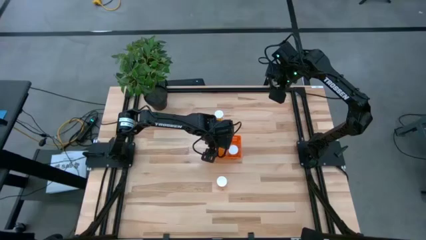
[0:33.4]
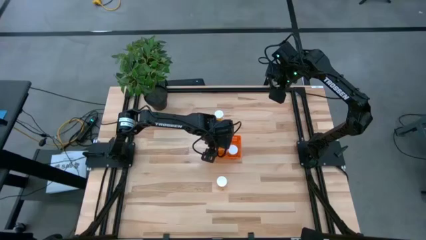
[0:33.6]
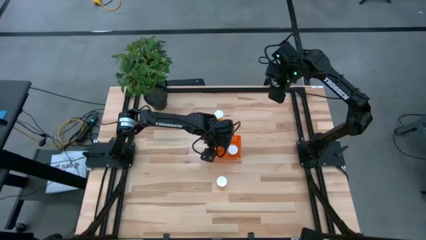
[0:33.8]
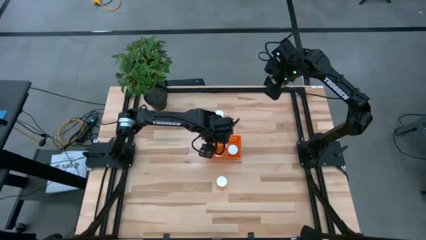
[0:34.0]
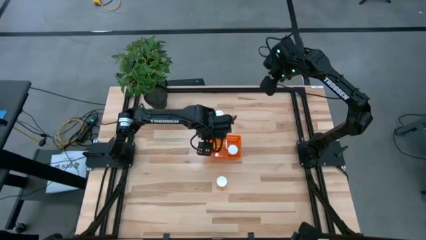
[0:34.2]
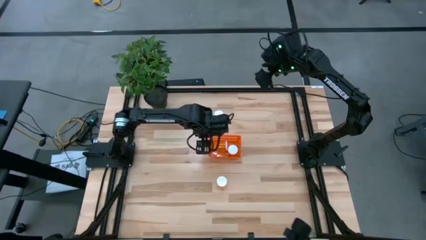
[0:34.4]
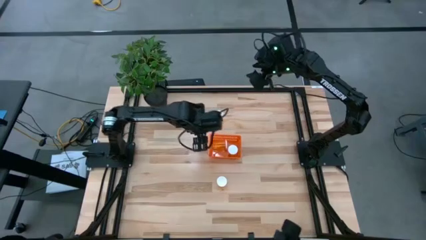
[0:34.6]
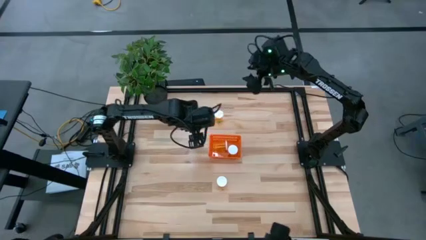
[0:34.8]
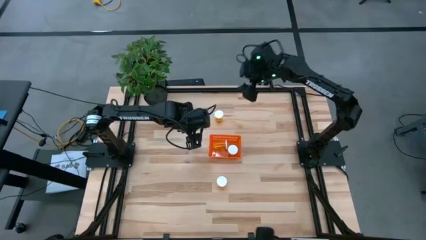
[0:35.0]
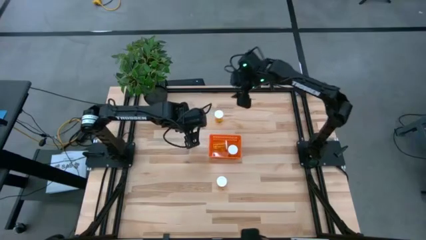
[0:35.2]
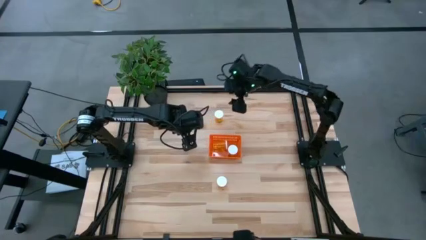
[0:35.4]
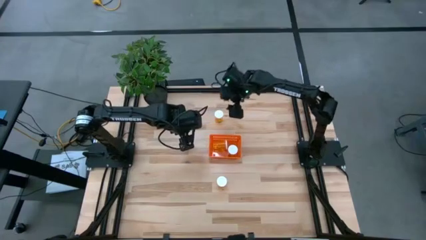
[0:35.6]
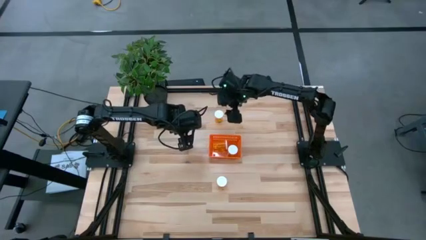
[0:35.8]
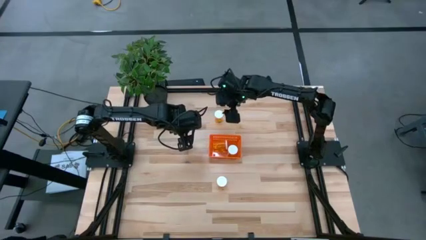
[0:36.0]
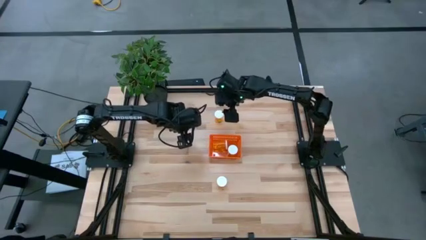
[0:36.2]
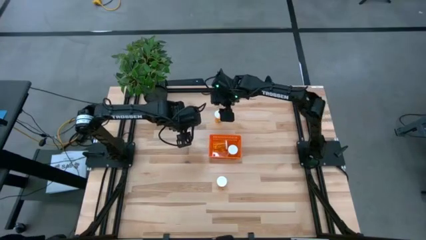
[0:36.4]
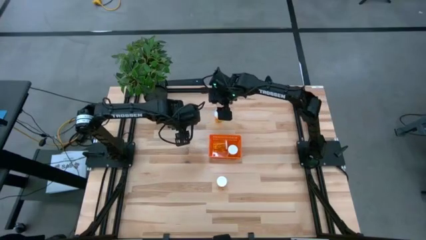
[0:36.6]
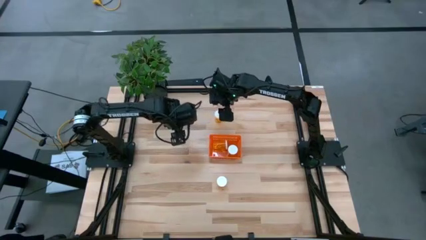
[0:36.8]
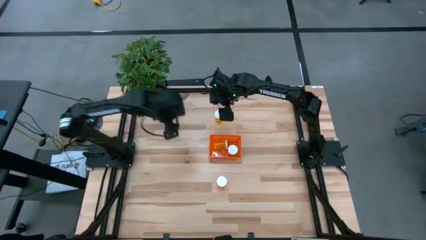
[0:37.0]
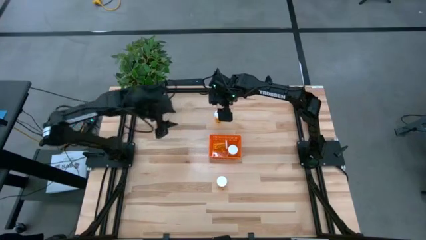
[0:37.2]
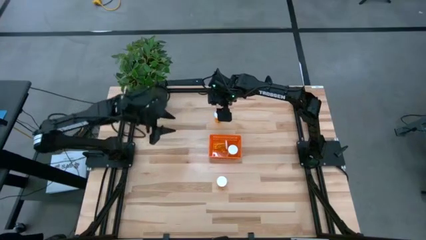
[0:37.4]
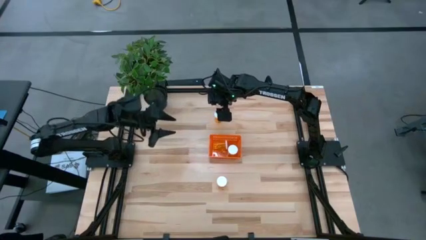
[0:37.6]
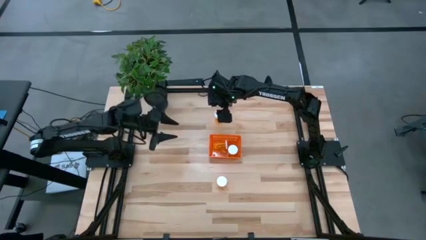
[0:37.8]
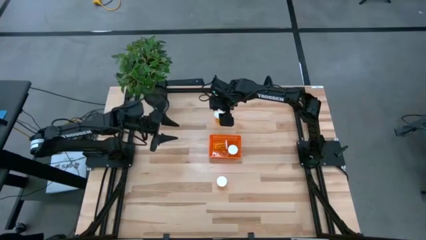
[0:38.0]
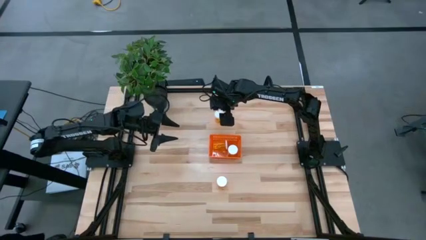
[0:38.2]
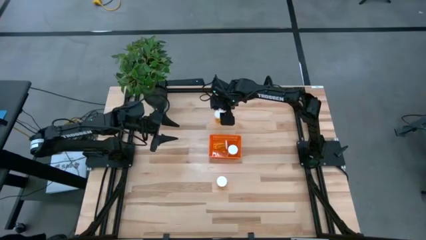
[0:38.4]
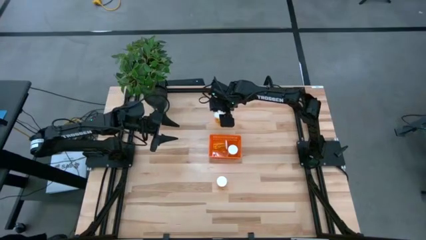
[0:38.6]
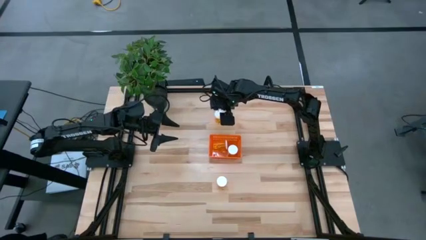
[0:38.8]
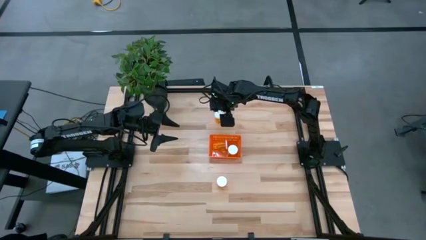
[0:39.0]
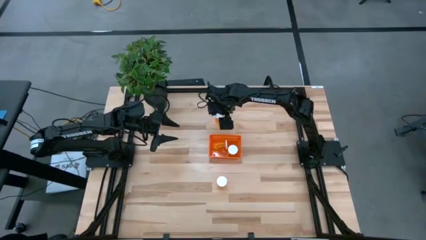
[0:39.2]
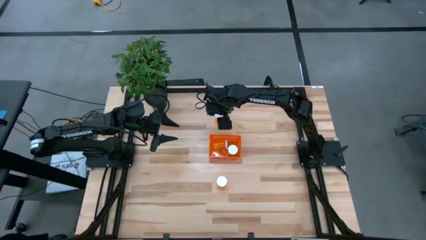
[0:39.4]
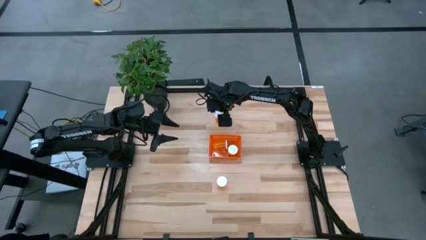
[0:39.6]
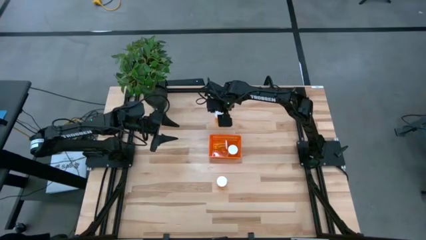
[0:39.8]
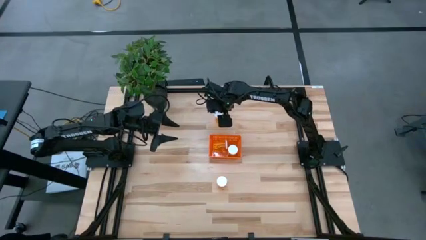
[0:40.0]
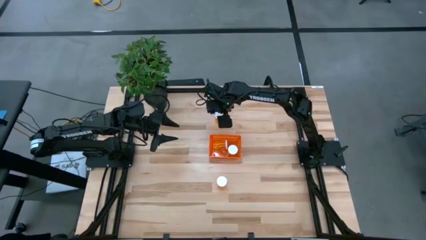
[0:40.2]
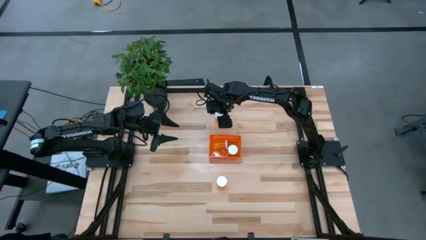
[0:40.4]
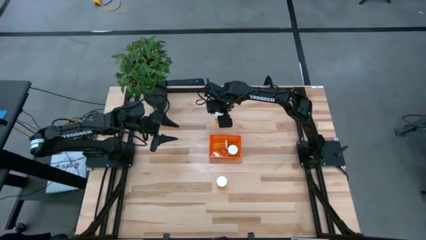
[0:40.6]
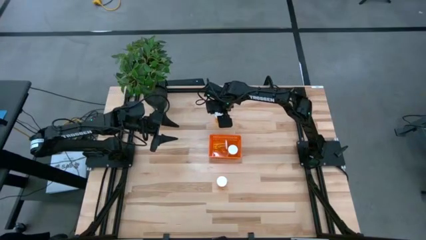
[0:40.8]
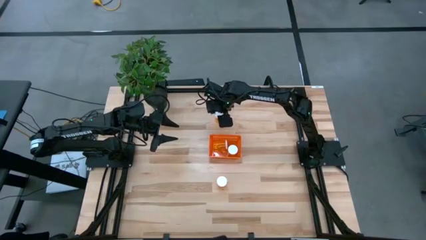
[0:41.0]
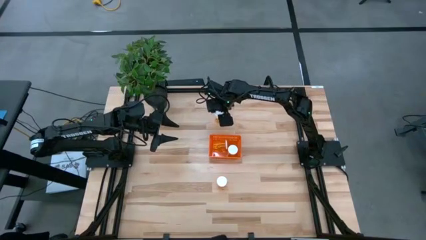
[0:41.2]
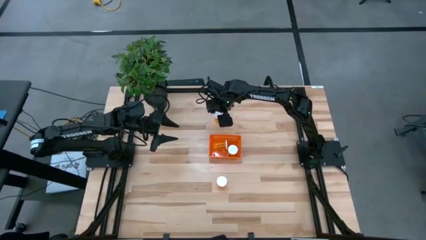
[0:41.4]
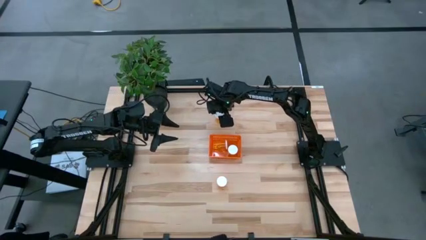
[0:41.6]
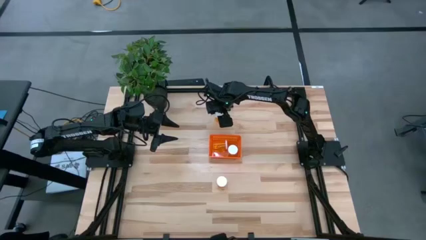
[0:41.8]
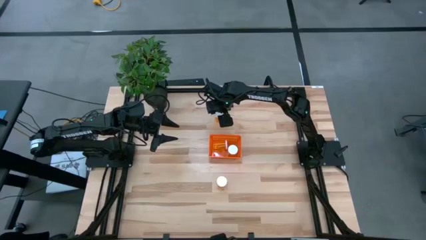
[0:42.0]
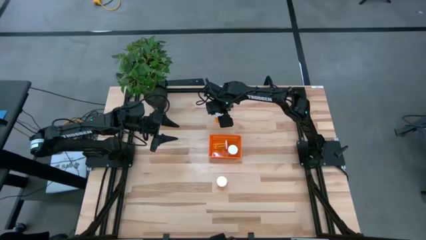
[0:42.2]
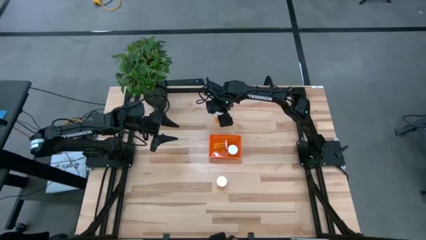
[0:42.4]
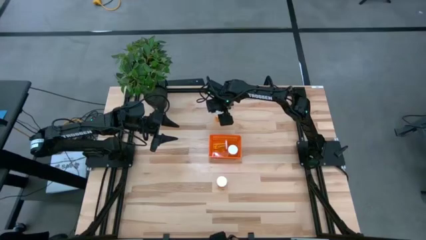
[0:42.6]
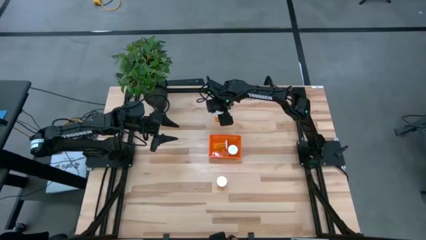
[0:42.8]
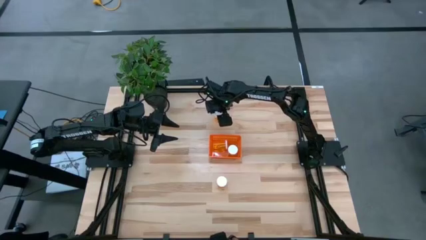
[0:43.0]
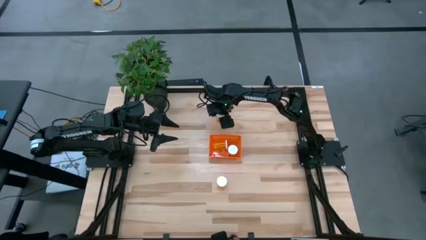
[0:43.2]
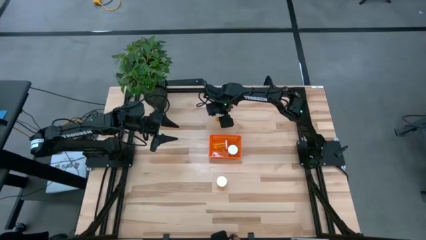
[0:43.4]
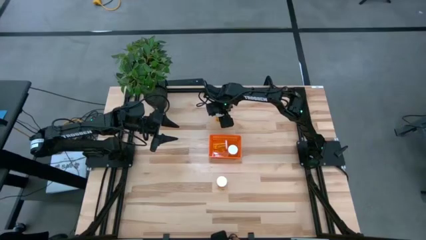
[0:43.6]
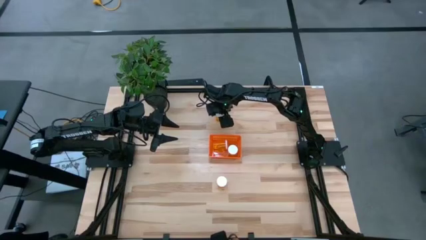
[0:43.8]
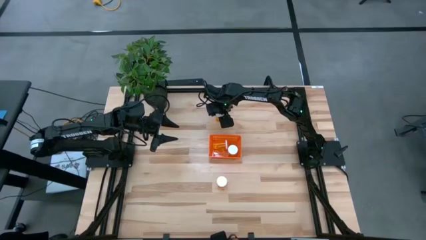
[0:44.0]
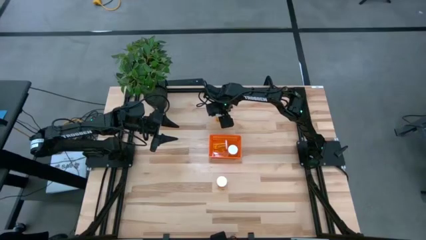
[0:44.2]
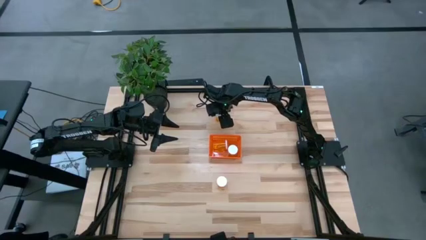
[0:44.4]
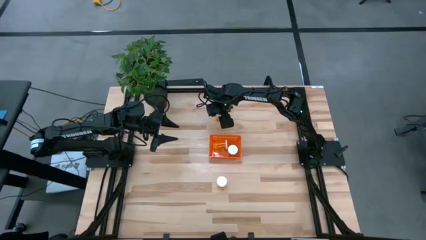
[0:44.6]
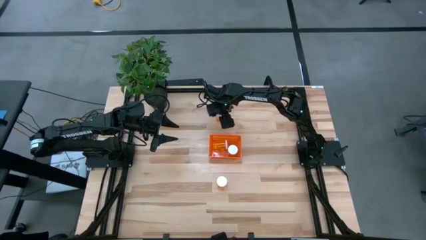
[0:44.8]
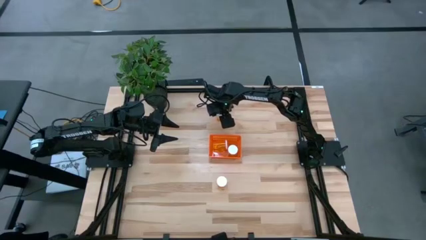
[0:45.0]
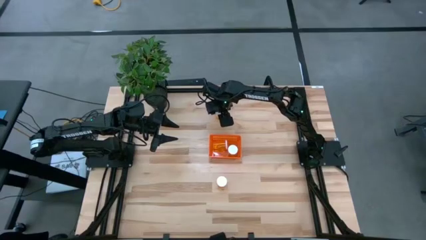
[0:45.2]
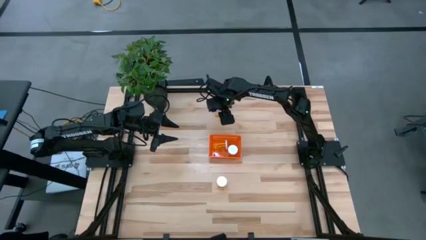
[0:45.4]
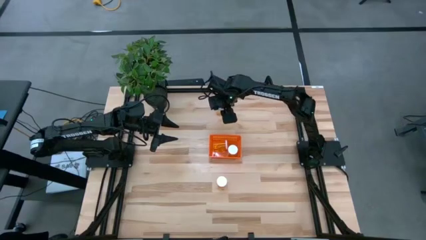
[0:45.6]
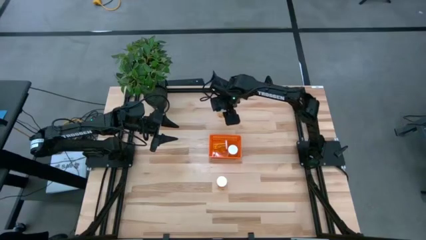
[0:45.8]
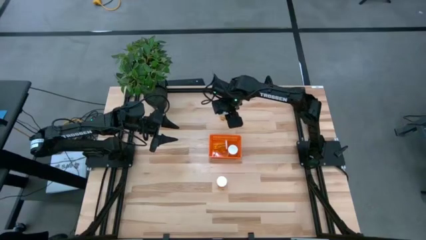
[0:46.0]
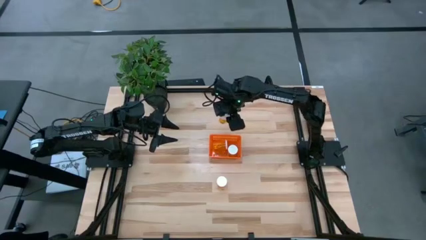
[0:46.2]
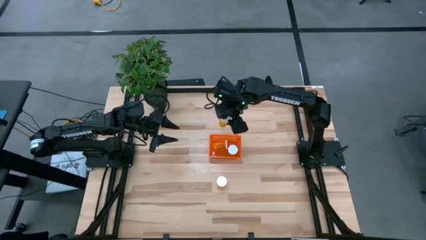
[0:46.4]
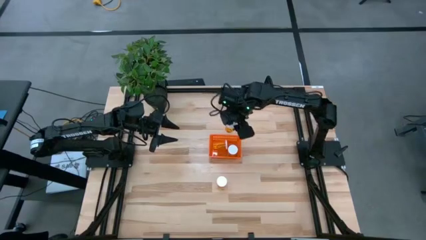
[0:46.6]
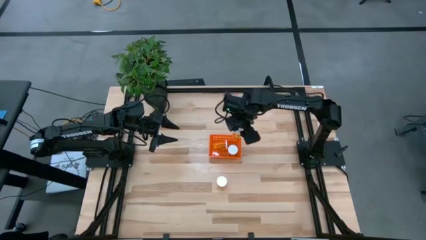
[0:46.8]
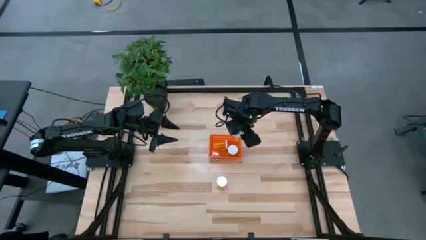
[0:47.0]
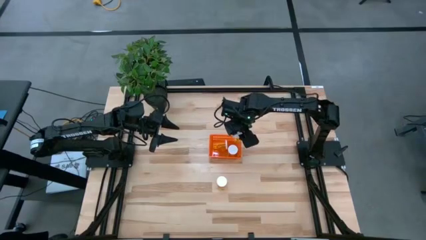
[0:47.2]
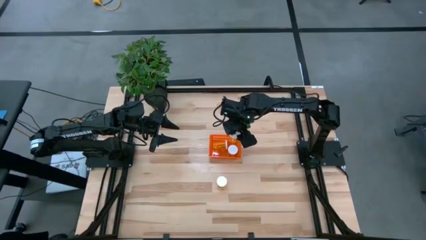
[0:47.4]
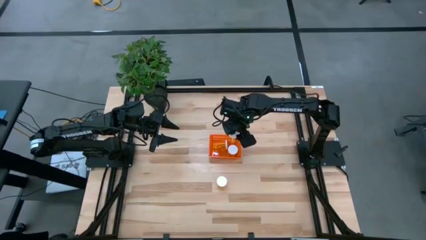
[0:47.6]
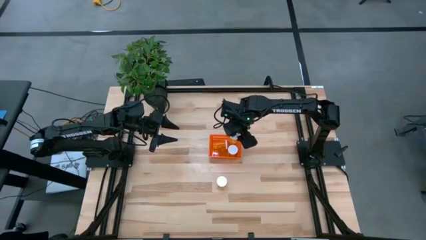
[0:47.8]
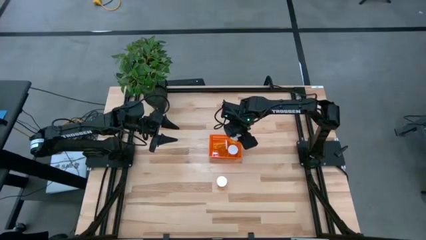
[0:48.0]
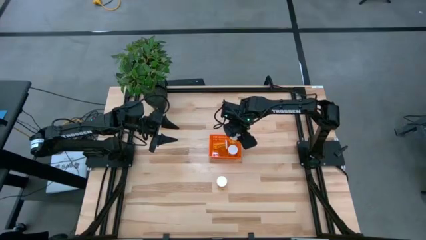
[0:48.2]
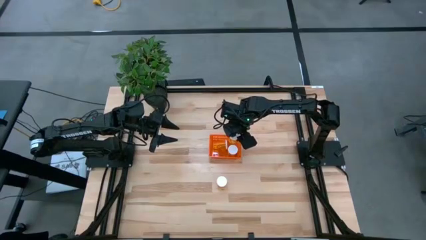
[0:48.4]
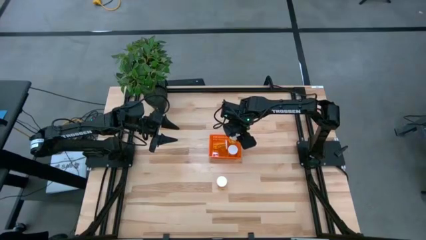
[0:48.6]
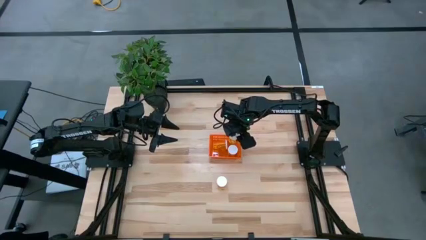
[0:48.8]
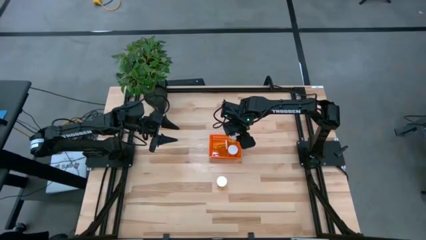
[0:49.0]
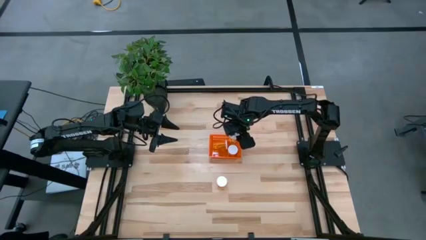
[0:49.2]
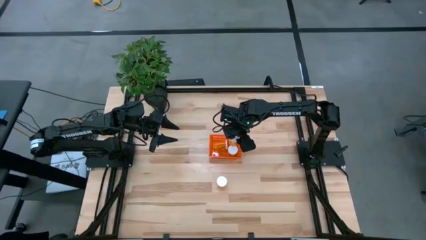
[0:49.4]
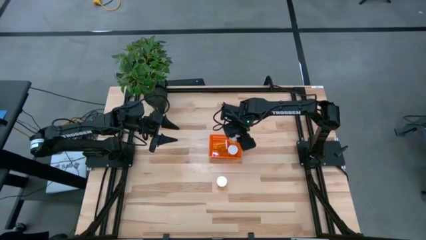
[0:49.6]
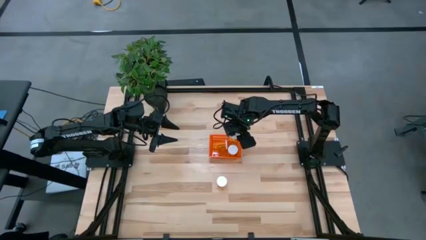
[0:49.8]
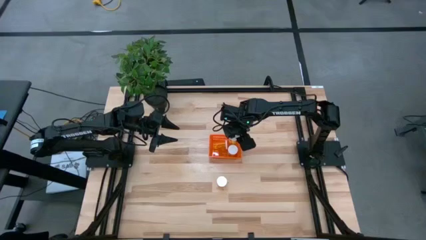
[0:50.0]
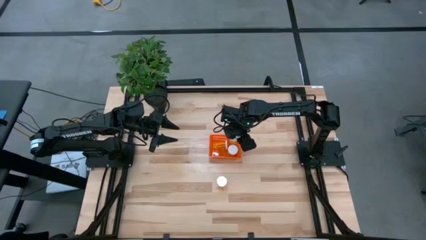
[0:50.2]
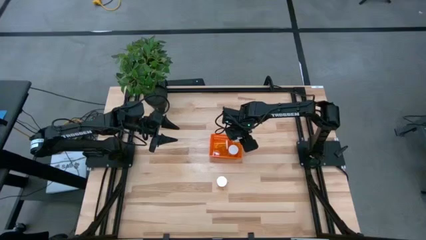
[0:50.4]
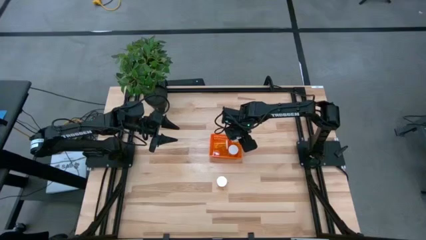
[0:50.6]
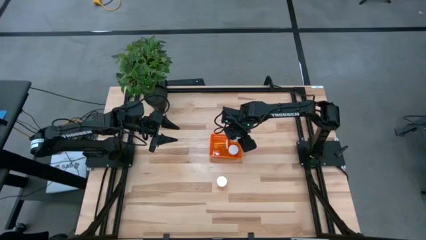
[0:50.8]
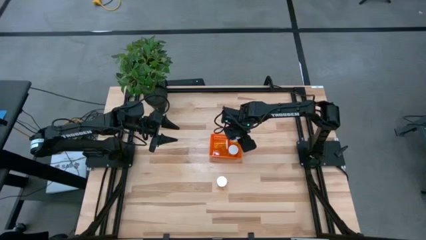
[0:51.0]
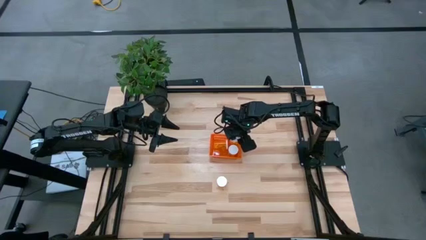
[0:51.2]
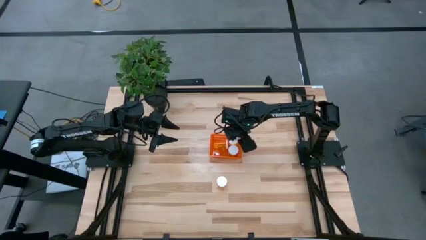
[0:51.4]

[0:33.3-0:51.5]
Task: Pick and place pill bottles into a basket
Put the orange medicine bottle into the orange basket
